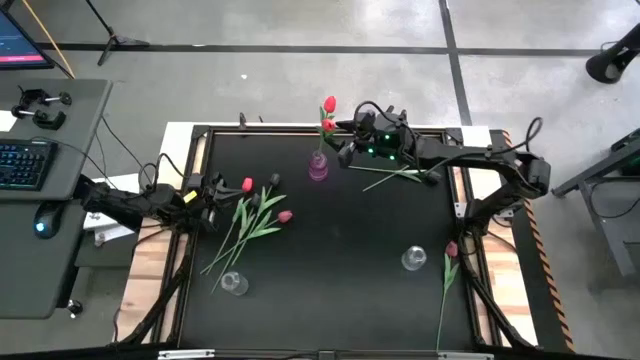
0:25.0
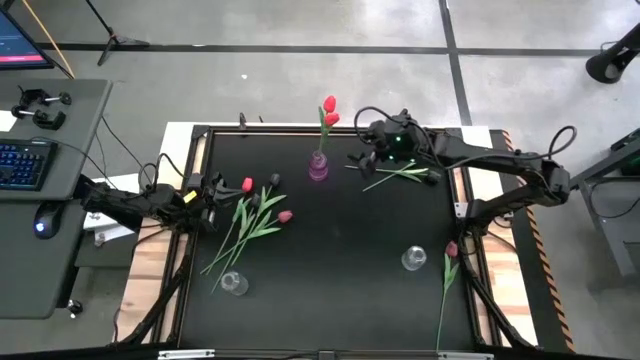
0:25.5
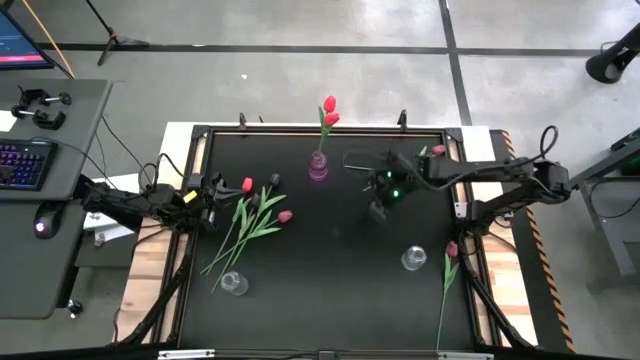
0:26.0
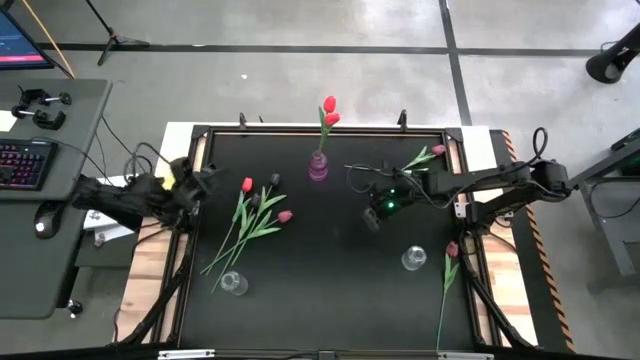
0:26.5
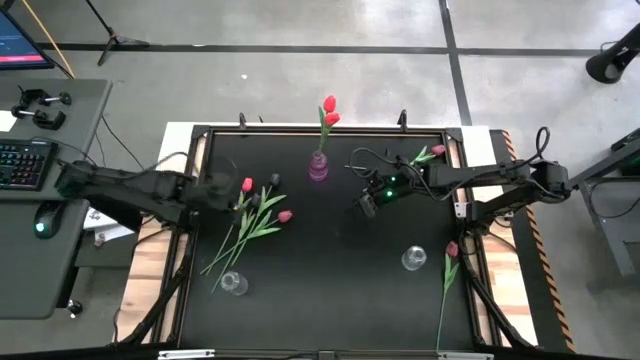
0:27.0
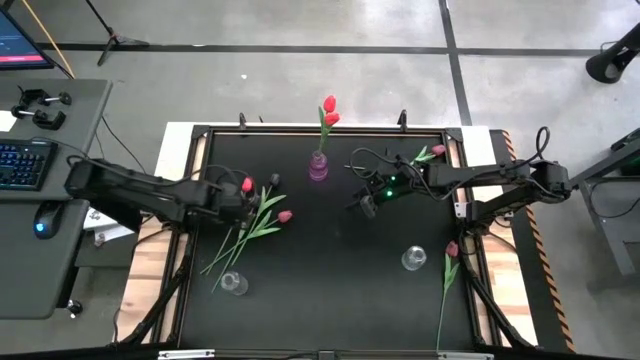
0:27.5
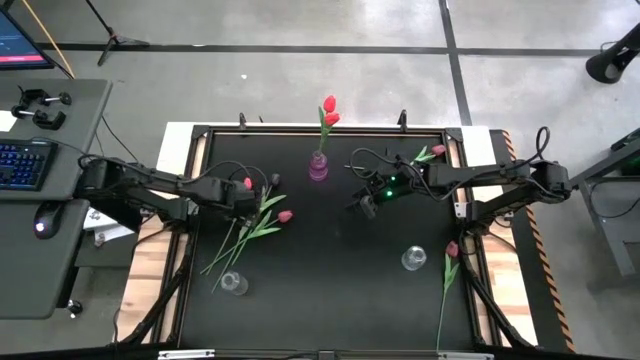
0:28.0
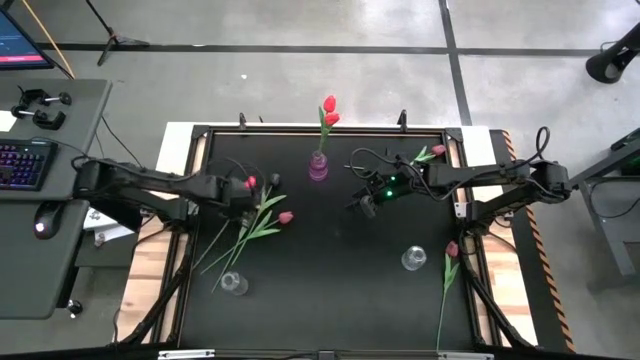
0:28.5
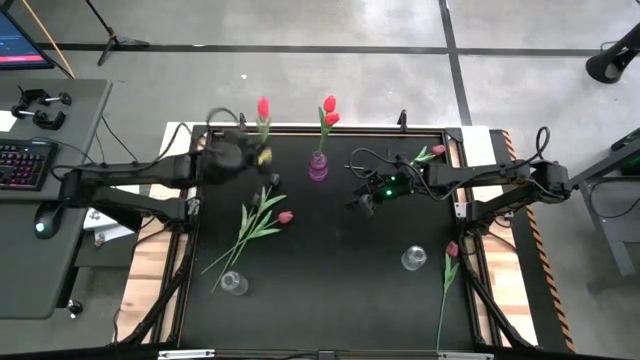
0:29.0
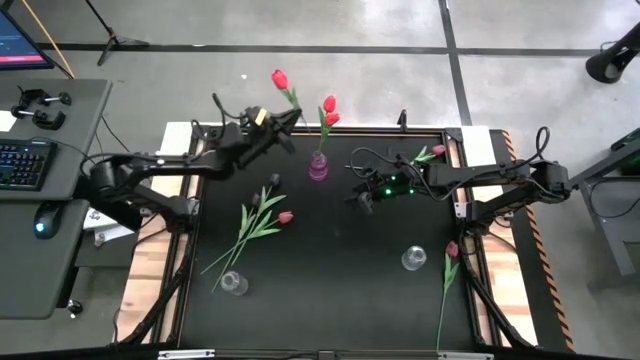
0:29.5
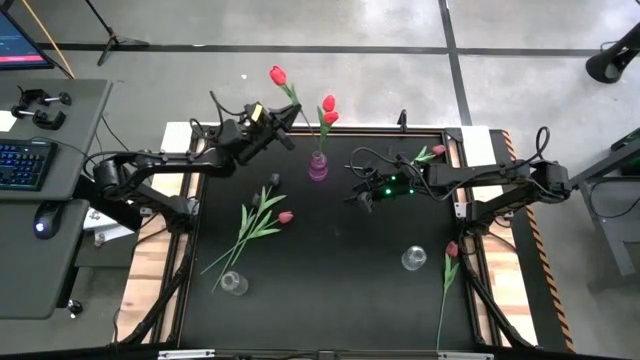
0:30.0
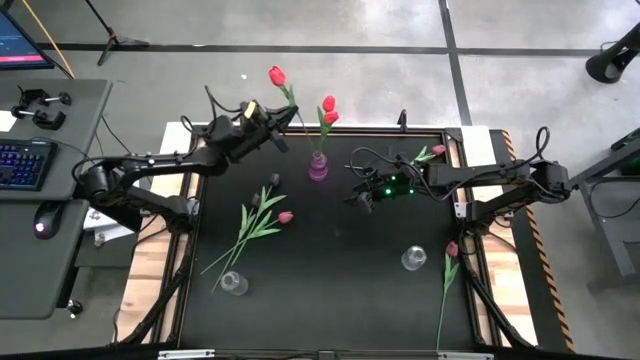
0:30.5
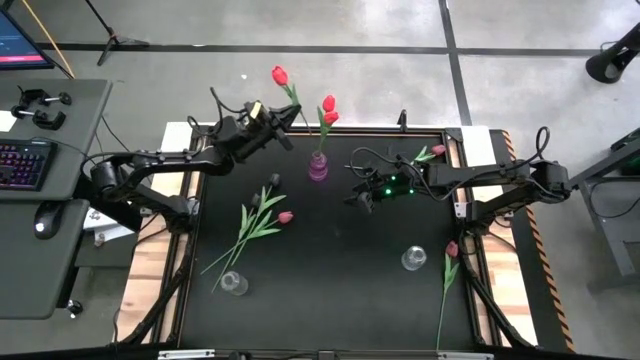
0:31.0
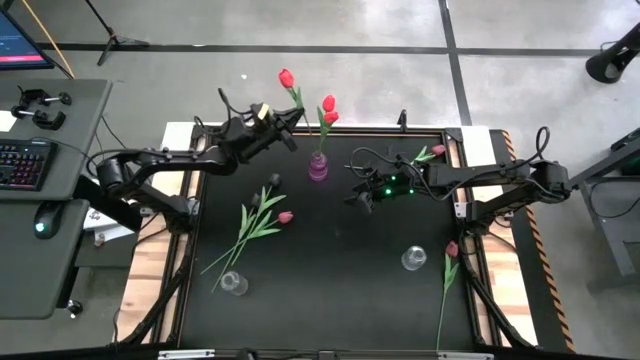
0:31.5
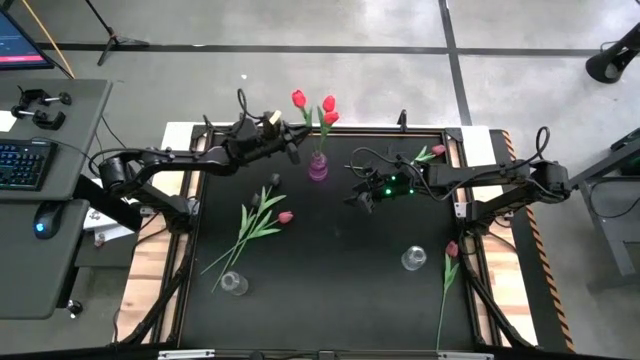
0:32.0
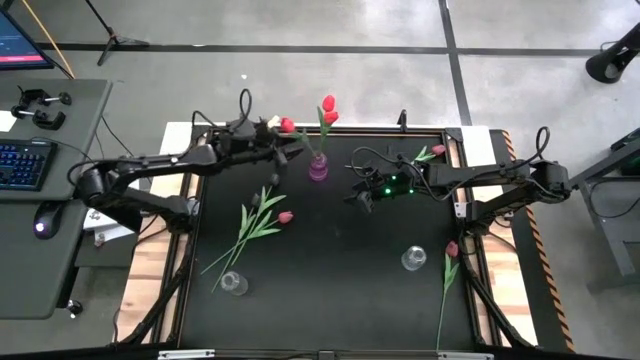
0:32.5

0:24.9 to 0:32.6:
Task: Sort flowers into vase by color
Put the pink tulip into the violet vase

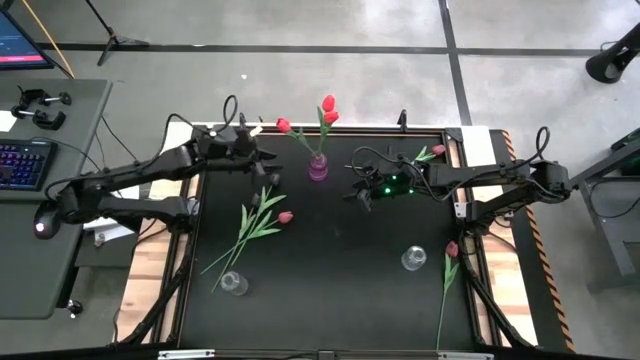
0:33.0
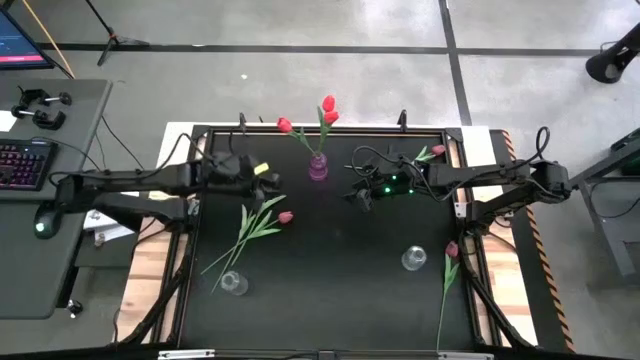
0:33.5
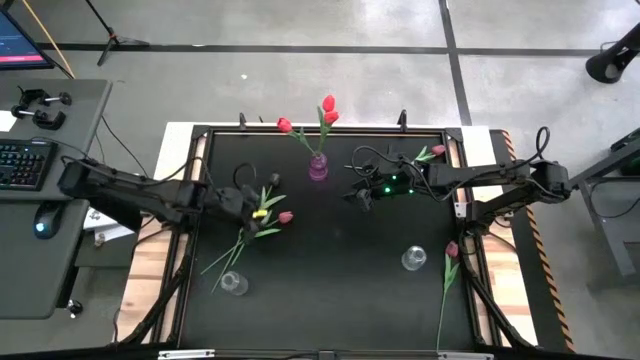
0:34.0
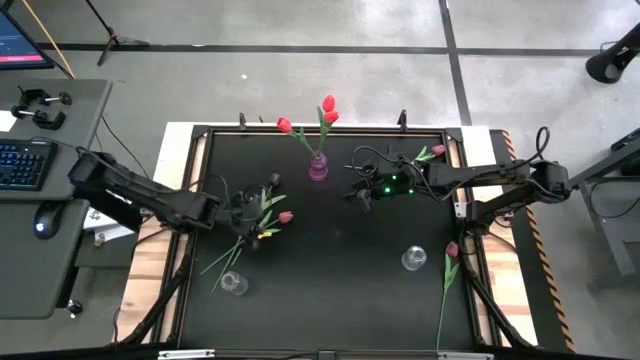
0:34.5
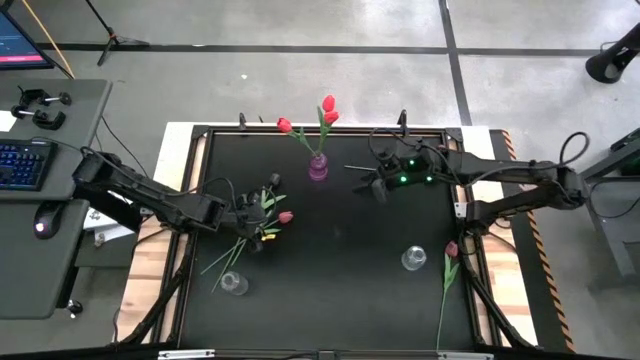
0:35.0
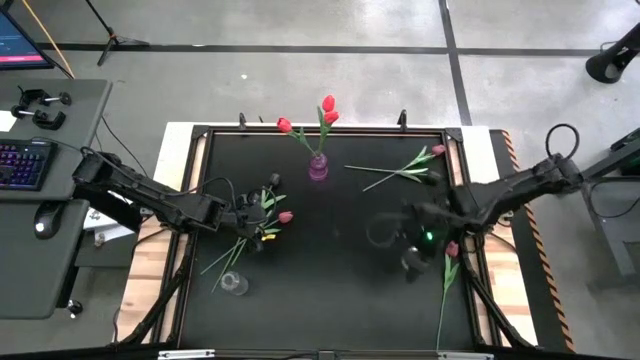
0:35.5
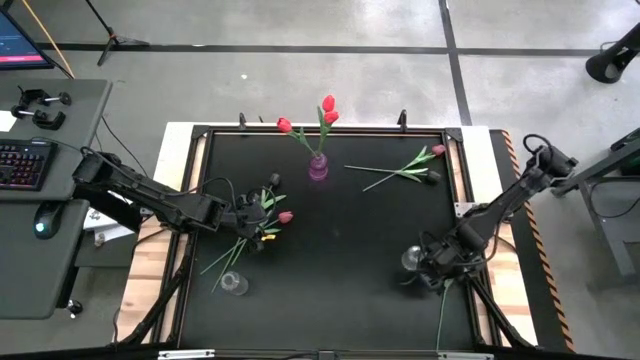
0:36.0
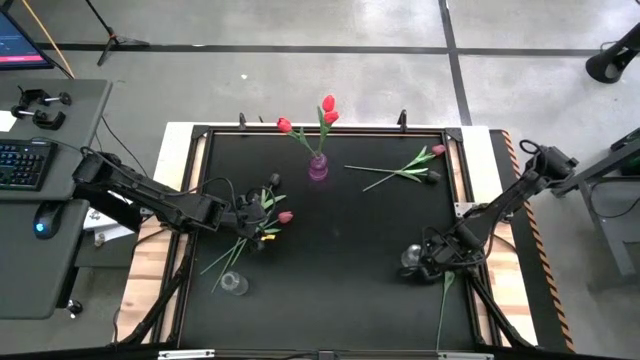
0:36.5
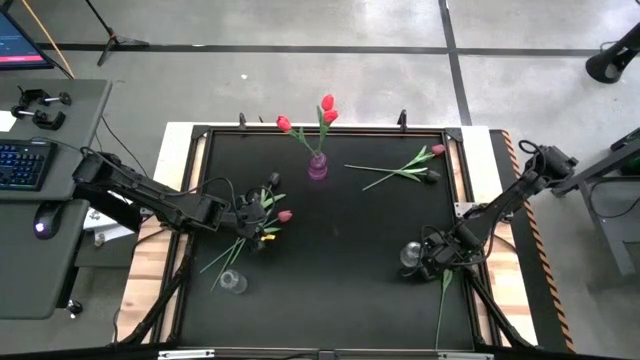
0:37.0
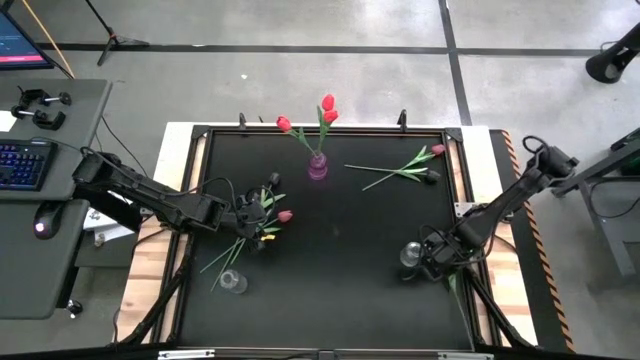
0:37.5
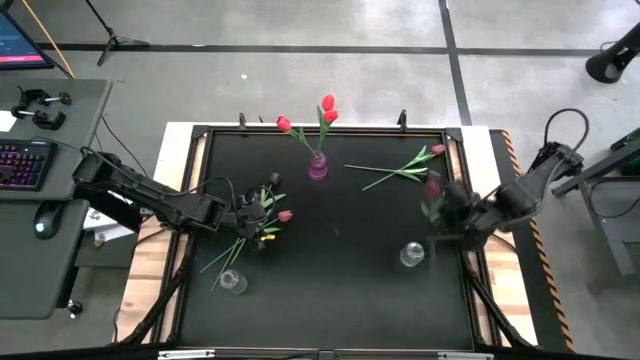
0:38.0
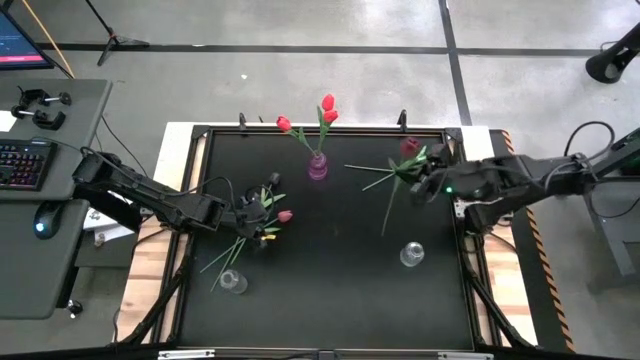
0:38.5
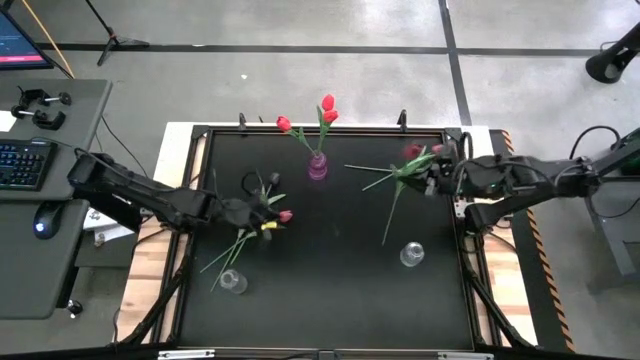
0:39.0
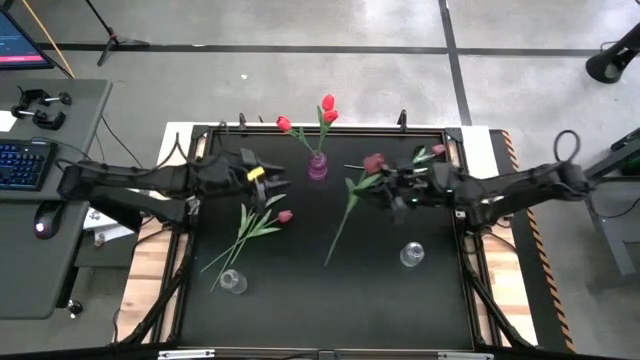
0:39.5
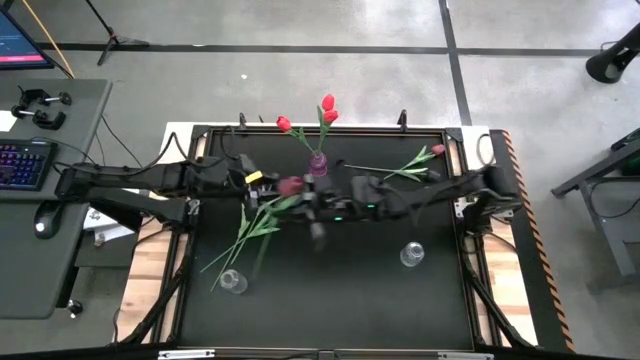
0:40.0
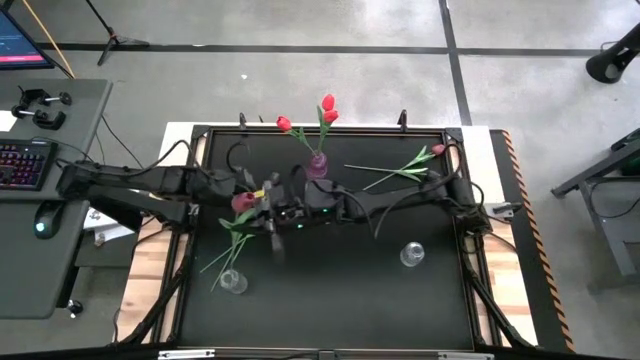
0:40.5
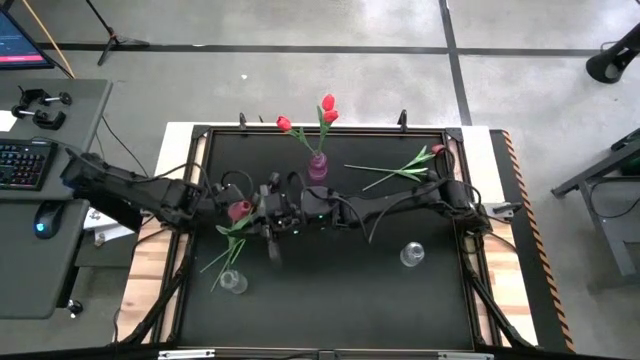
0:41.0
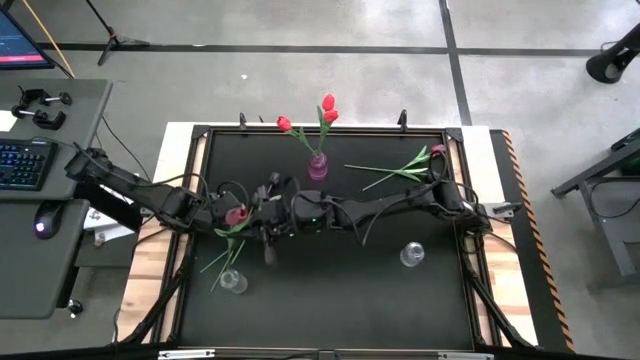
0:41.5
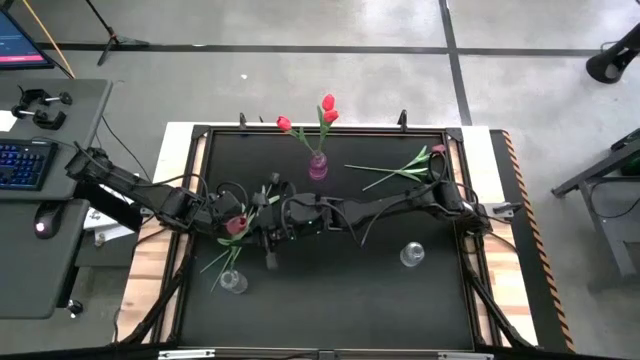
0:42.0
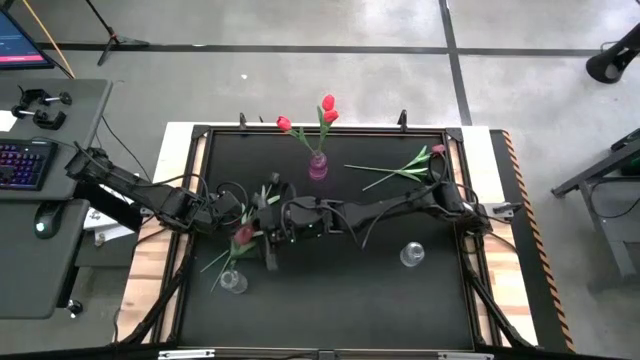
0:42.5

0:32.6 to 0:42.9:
Put the bottom red tulip into the left transparent vase

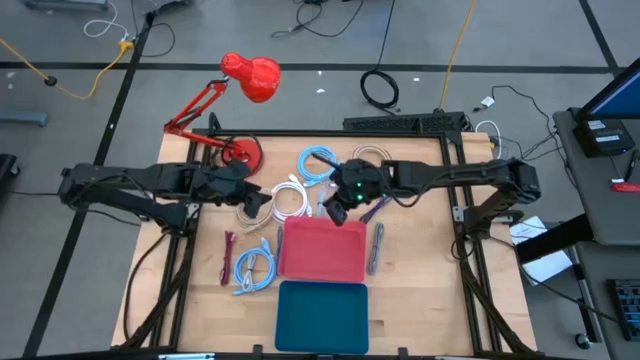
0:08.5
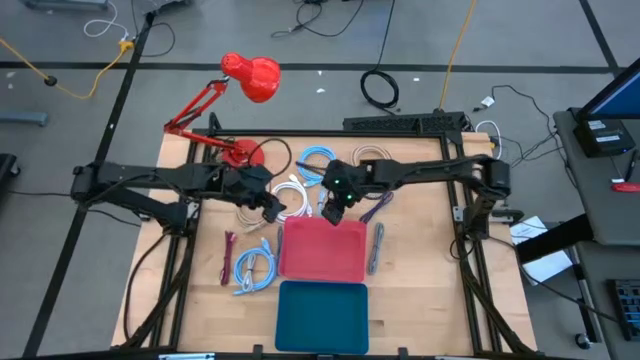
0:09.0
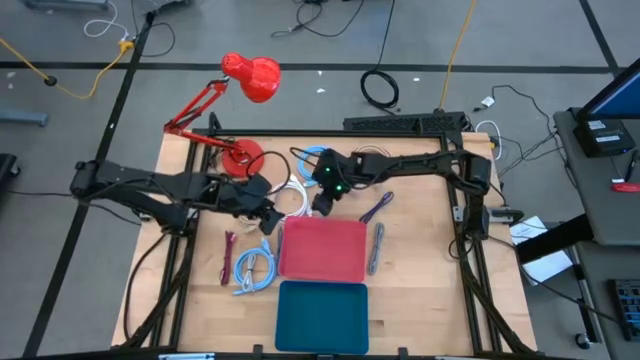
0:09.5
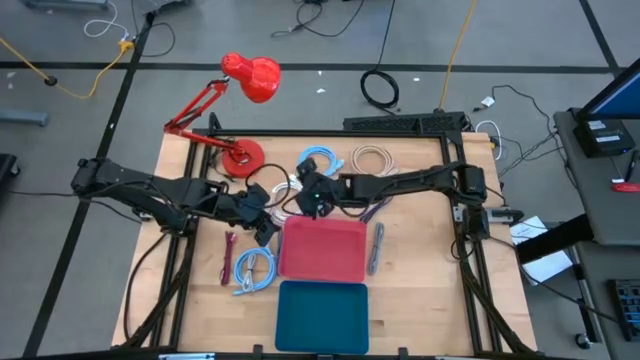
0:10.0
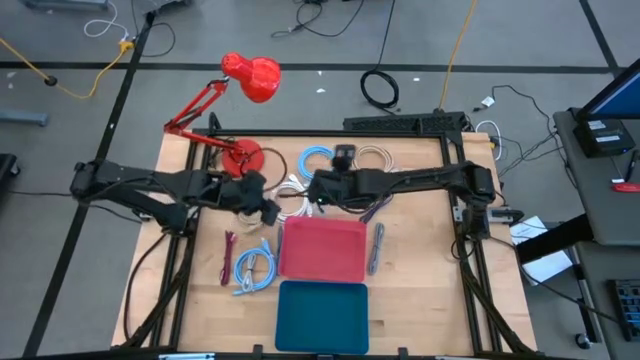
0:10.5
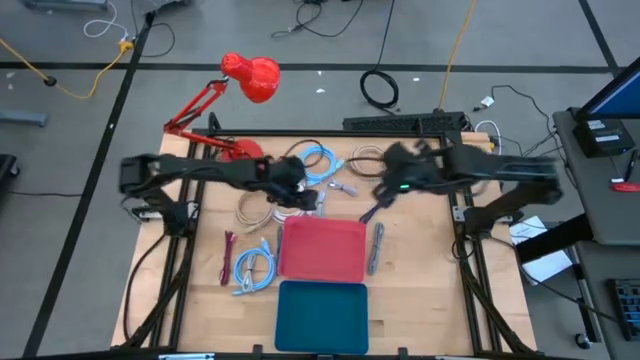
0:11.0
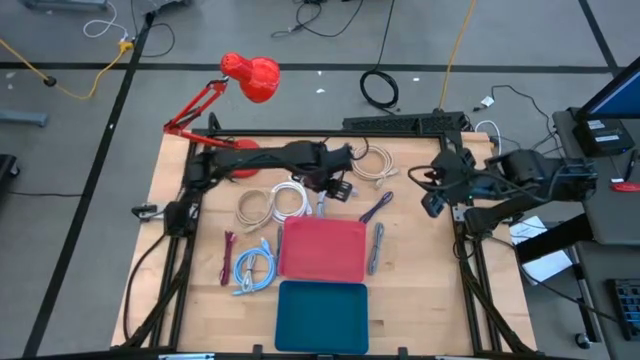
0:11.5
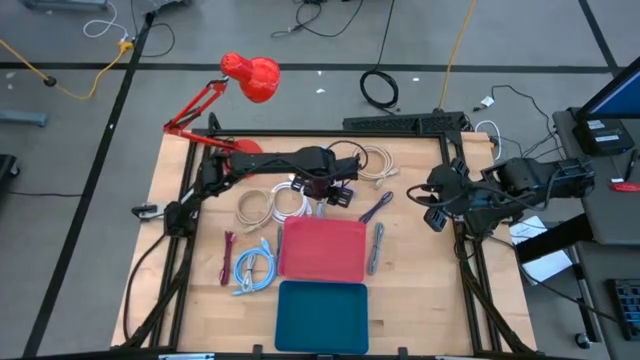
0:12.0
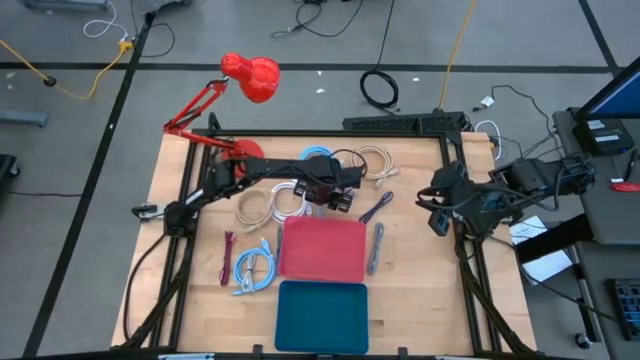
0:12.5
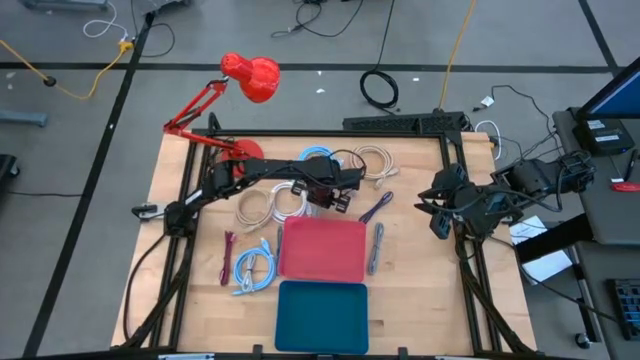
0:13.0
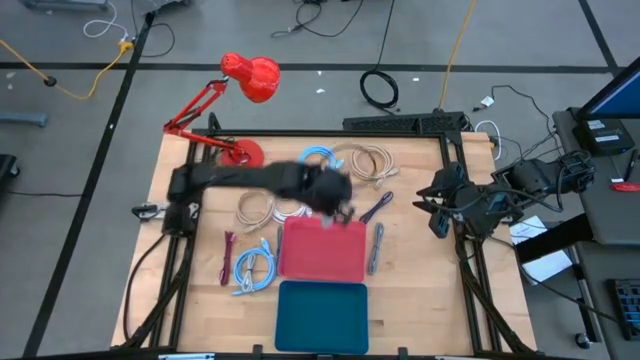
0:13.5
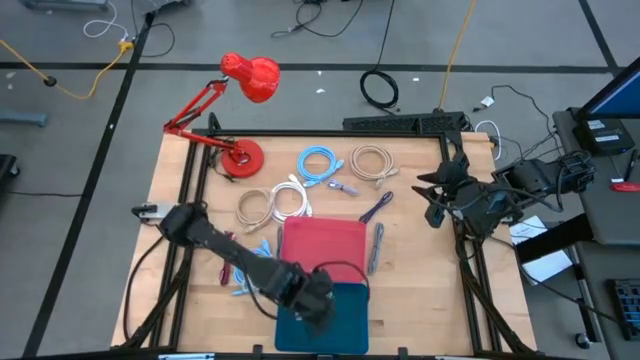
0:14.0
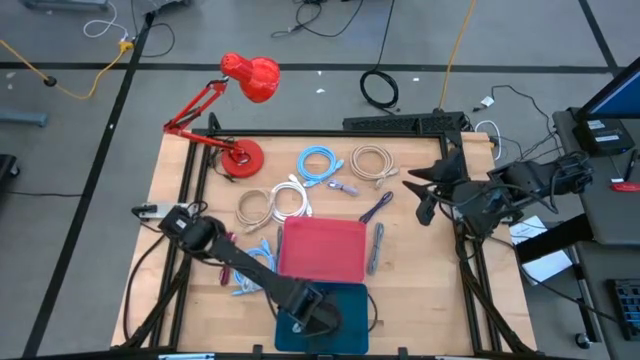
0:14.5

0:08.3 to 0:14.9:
Task: Pick & Place USB Port
Put the light blue charger cable into the blue bin
